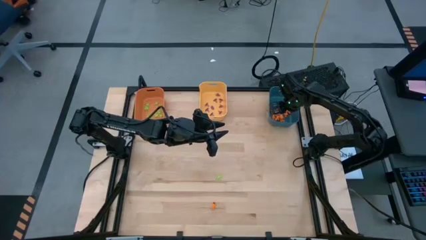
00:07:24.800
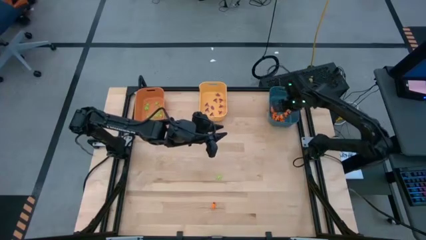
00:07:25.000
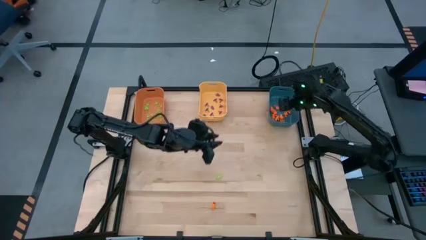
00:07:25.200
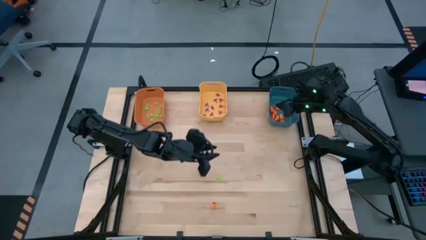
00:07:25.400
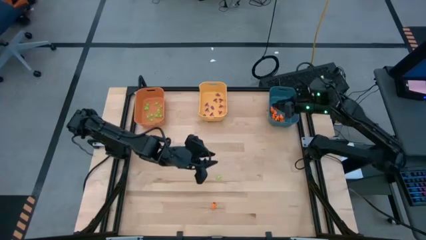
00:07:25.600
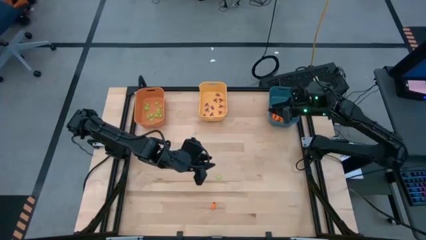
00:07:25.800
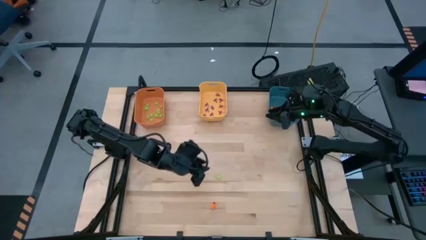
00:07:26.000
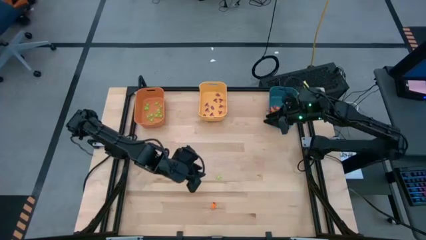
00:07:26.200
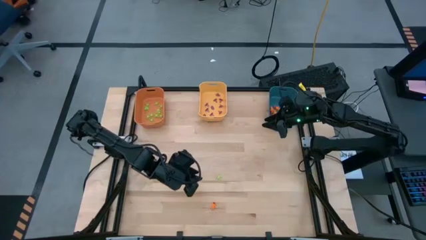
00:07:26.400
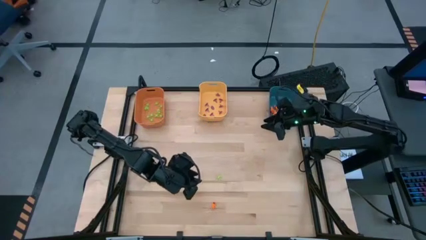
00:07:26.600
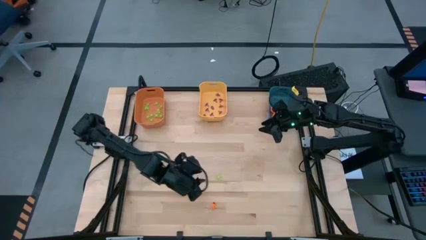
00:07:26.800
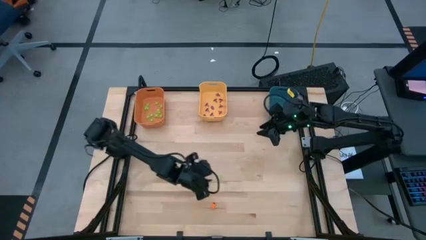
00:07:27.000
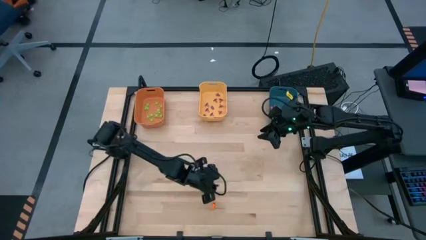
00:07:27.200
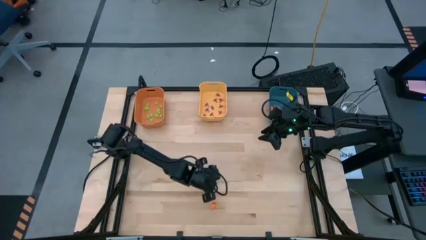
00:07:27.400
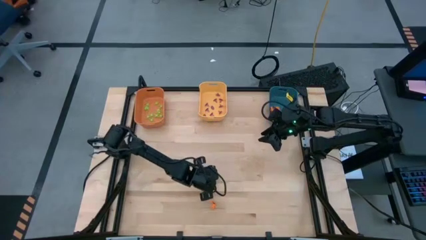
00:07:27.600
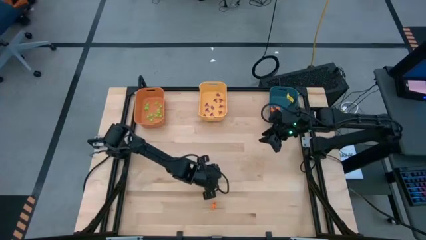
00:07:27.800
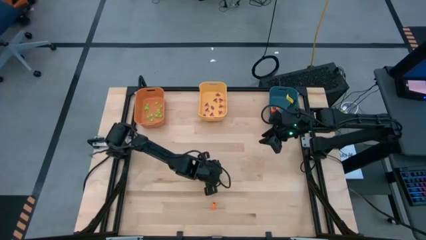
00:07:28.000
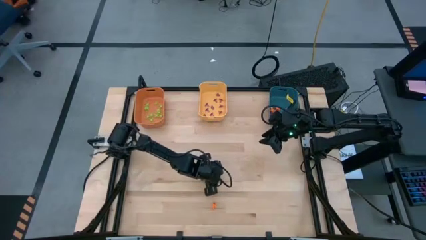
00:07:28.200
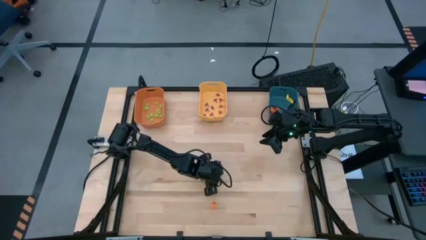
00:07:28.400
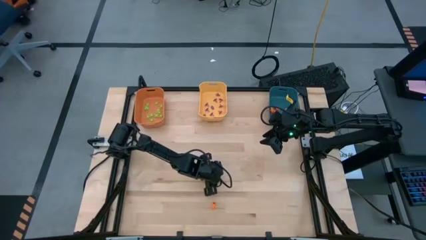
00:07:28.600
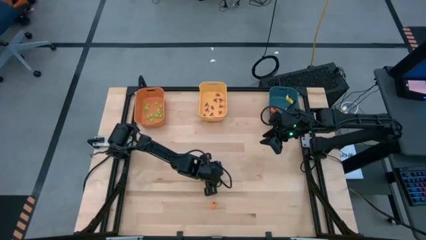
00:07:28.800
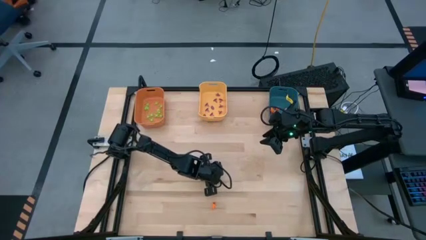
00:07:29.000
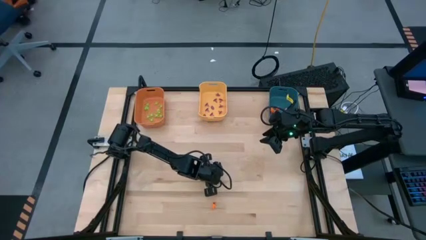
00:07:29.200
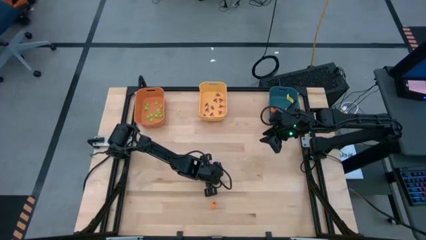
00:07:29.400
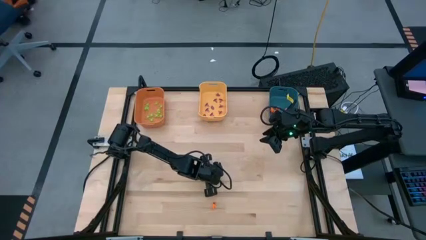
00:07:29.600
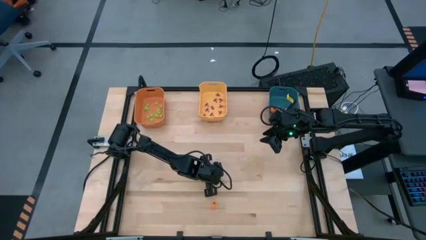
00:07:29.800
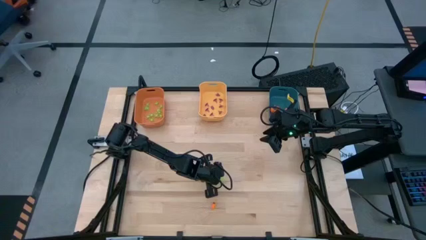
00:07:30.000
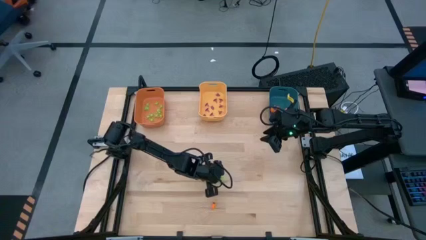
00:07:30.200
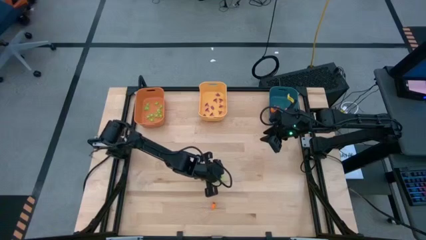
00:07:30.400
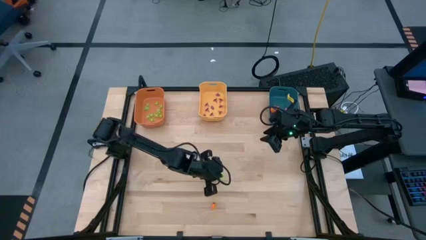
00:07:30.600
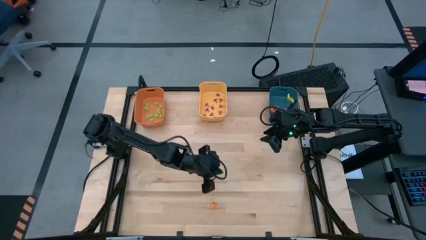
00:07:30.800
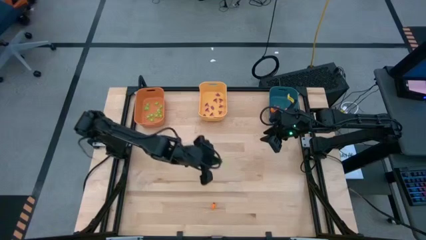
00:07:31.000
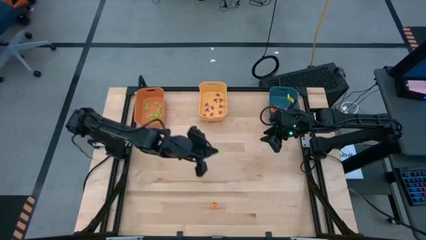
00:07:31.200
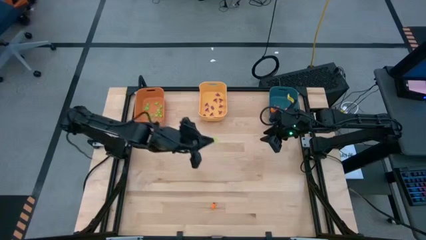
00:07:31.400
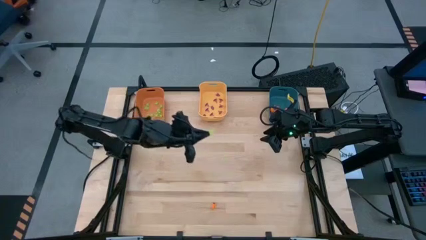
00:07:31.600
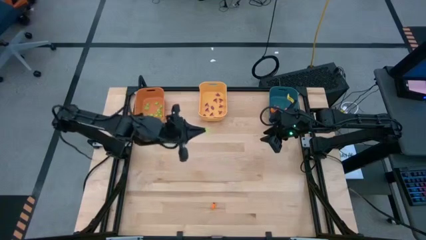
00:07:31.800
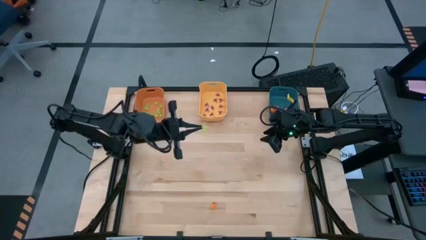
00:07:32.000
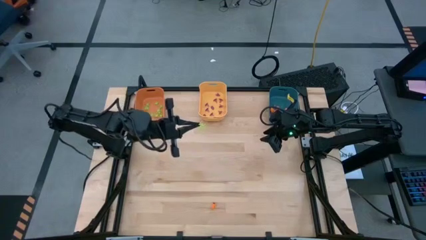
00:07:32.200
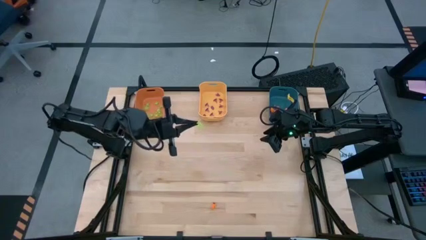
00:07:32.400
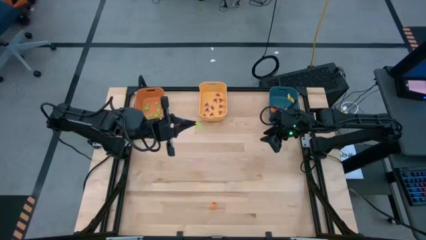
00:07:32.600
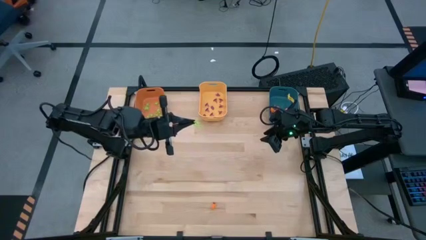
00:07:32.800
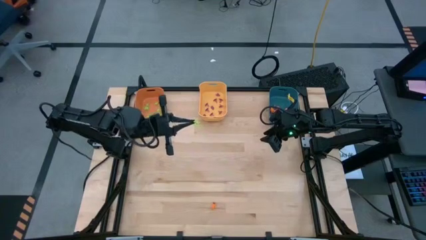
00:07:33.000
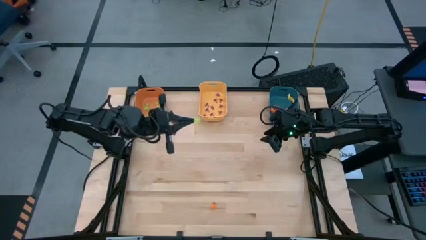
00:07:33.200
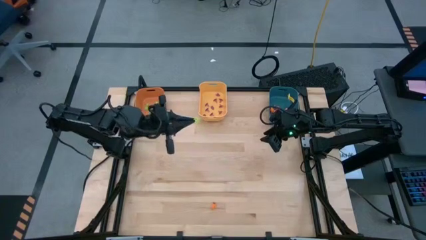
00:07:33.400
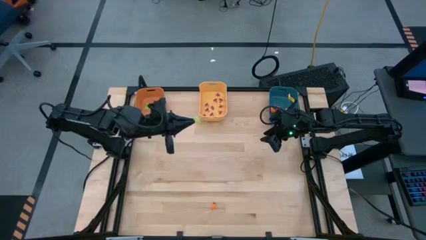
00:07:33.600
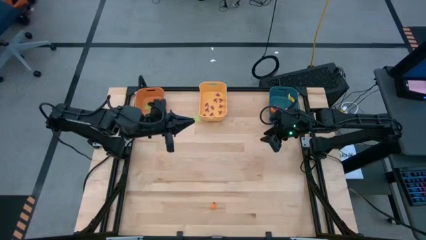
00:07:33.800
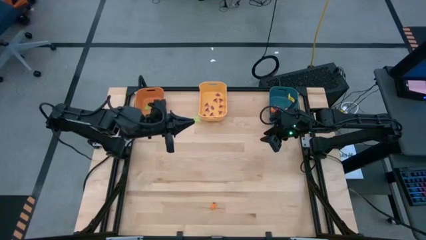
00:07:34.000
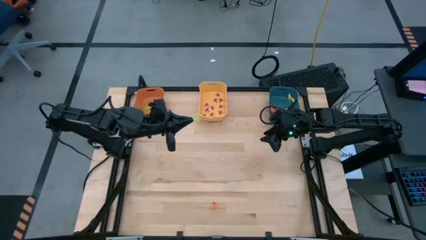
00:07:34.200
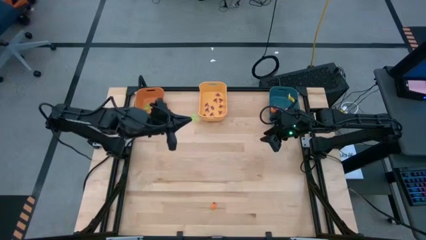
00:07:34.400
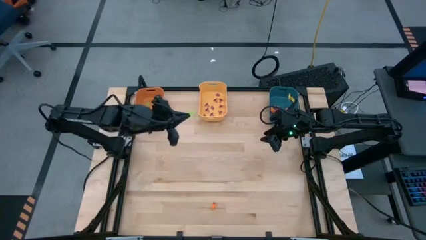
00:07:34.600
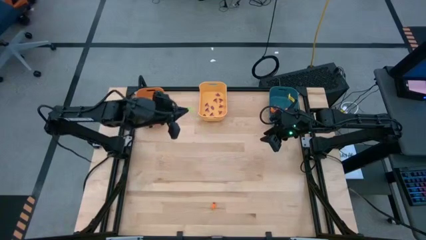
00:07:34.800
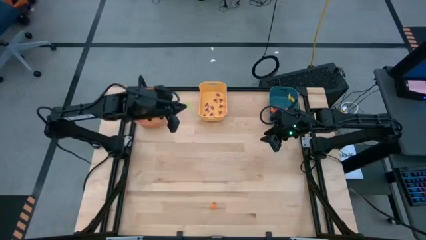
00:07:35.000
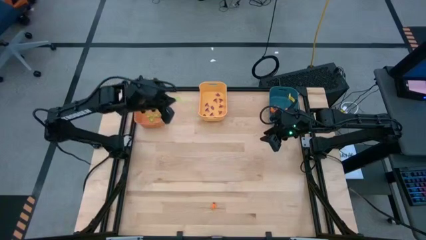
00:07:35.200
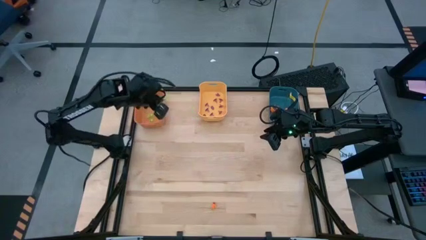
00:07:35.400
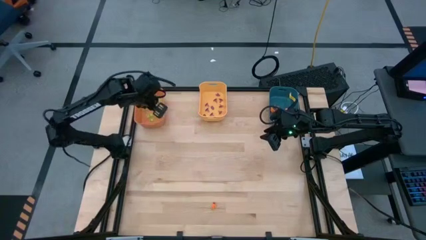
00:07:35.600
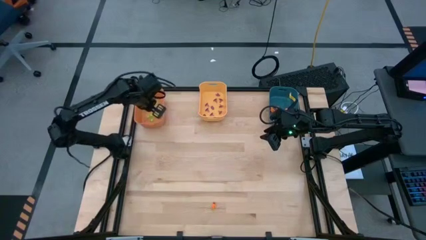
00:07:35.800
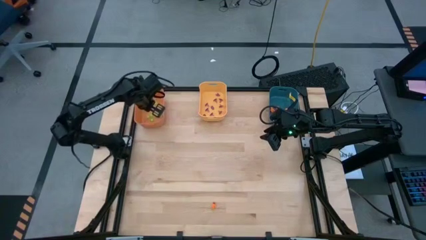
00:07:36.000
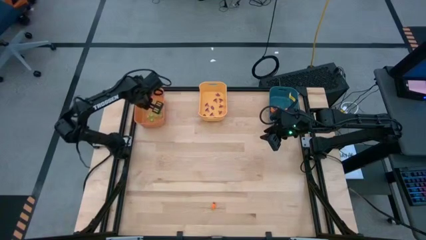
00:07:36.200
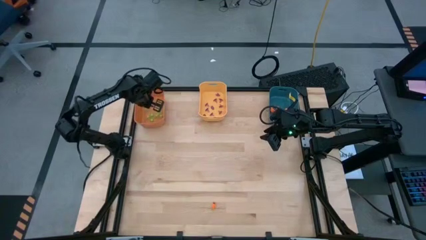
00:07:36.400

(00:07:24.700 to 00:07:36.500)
Task: Sort Halloween decoration
Put the green spider toy into the orange bin

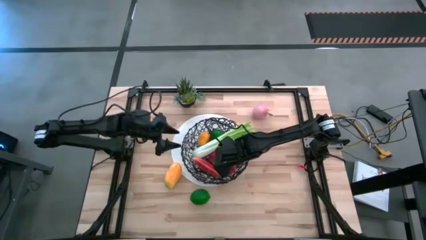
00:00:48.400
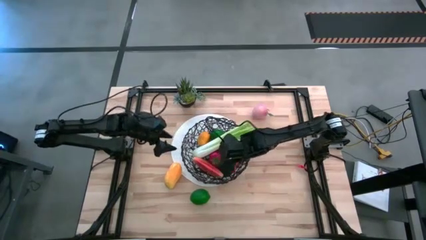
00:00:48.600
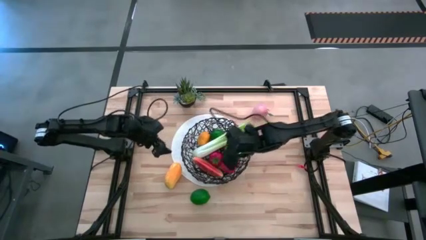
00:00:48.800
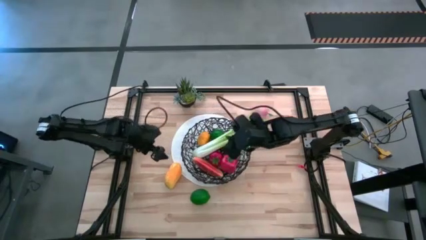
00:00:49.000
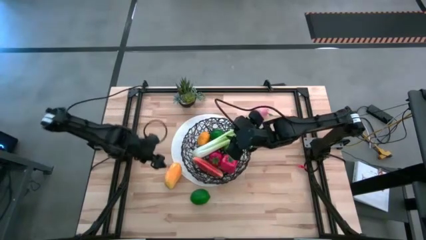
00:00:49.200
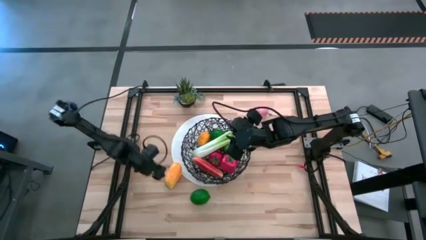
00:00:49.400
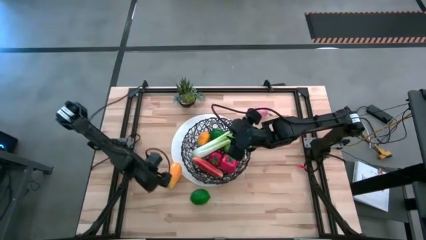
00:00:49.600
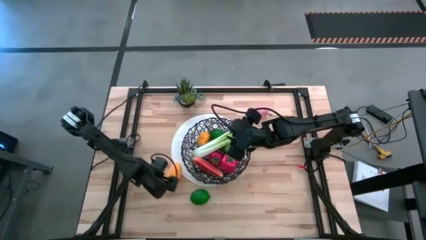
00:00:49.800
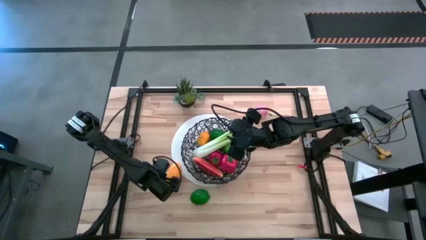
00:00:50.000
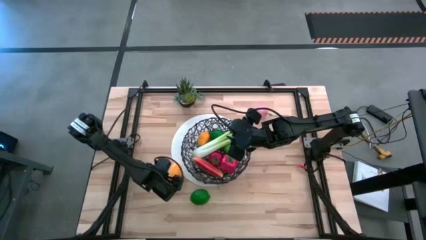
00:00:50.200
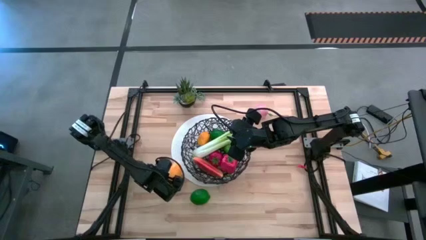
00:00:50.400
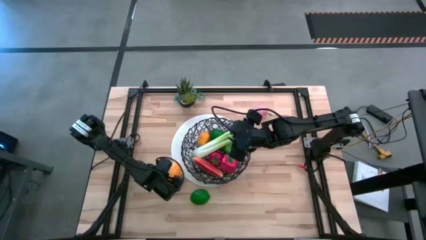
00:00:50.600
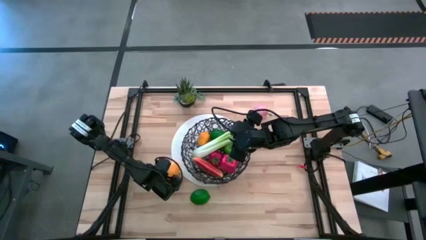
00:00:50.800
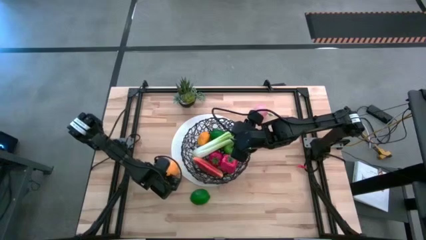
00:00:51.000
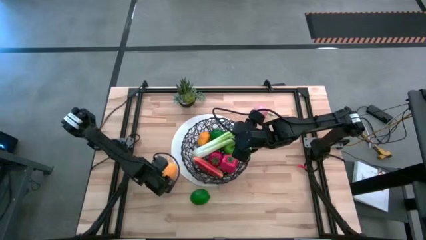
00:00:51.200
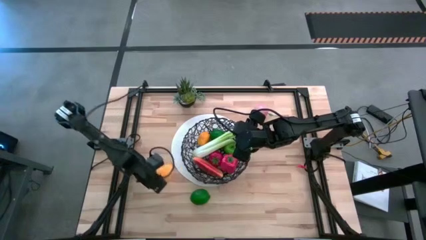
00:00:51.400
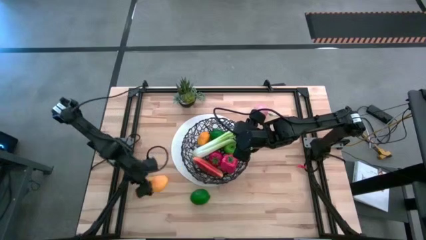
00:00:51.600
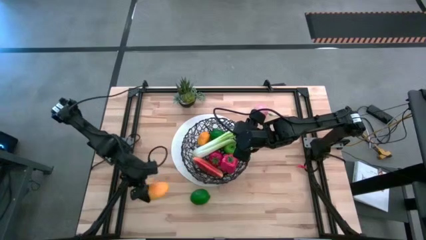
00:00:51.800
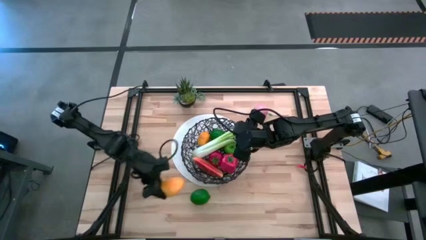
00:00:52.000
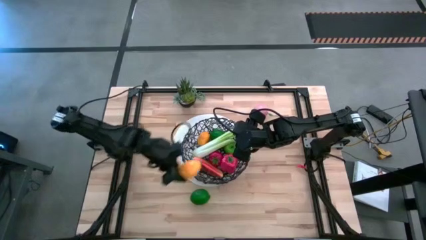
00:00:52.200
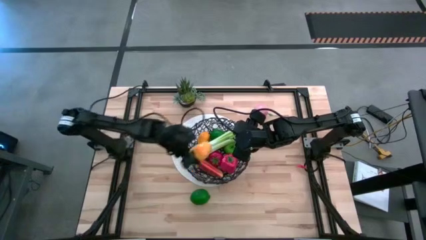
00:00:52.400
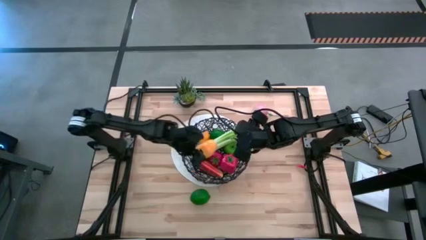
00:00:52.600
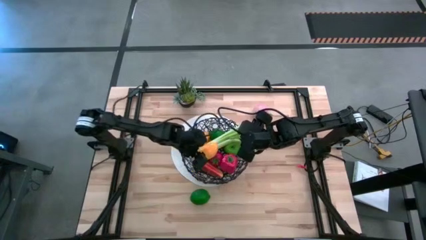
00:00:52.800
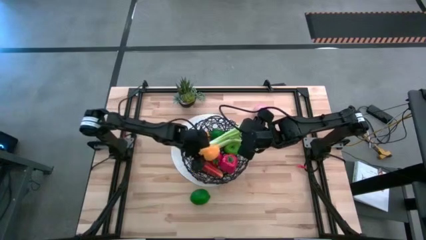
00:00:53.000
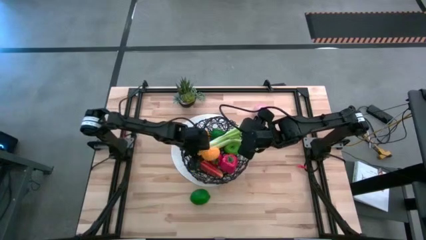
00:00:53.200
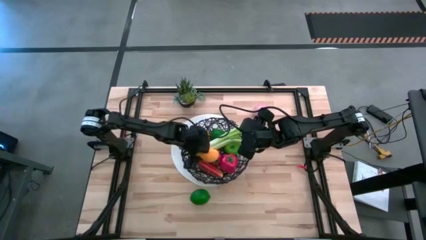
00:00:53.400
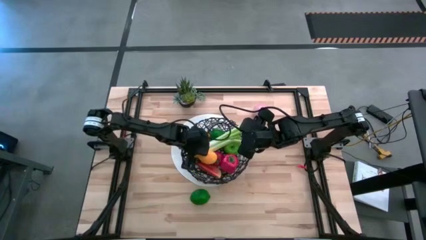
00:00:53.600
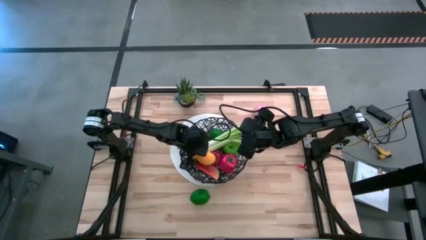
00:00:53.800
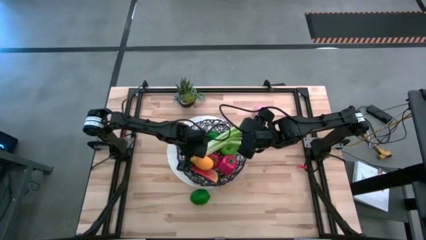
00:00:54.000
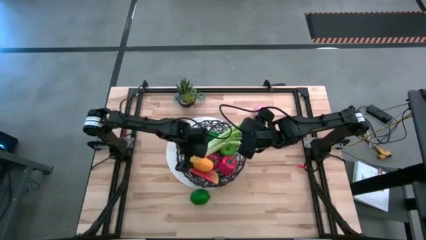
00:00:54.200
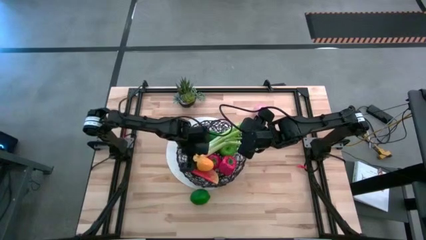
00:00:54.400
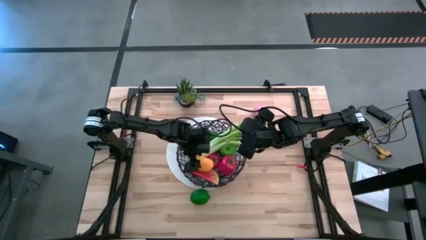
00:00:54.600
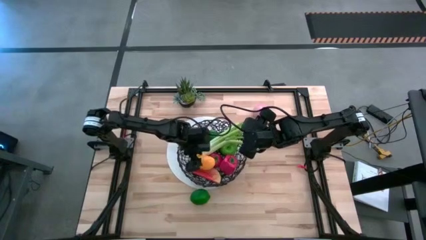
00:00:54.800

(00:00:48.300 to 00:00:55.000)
Task: Build produce basket
Put the yellow mango into the wire basket
